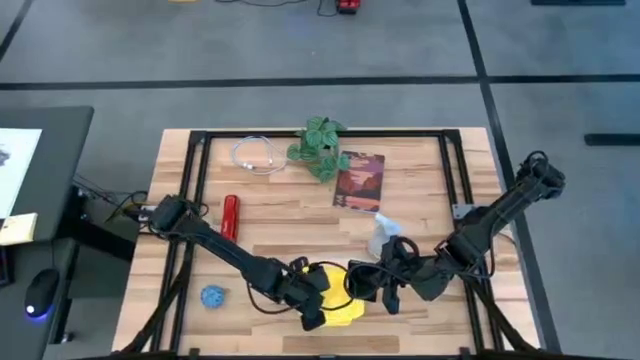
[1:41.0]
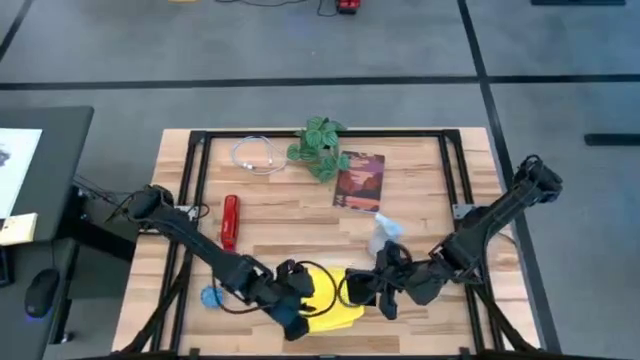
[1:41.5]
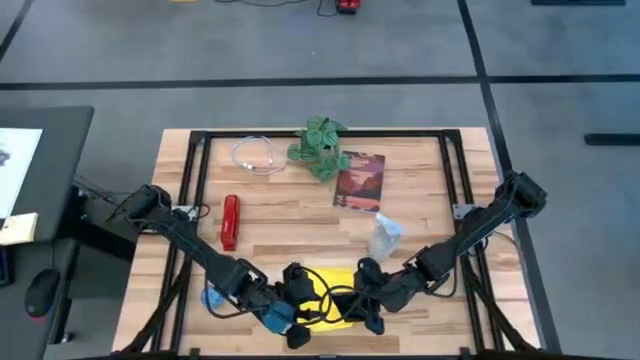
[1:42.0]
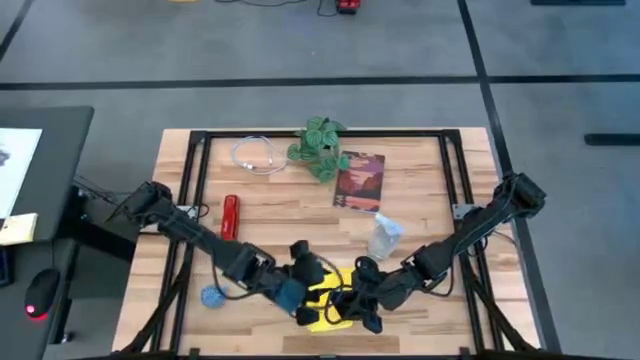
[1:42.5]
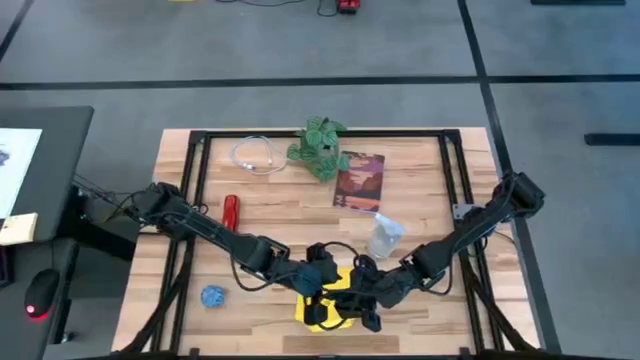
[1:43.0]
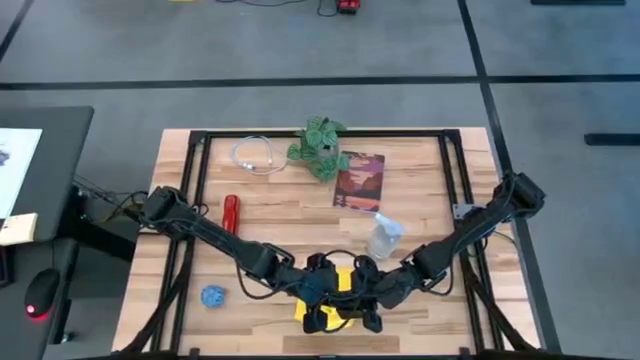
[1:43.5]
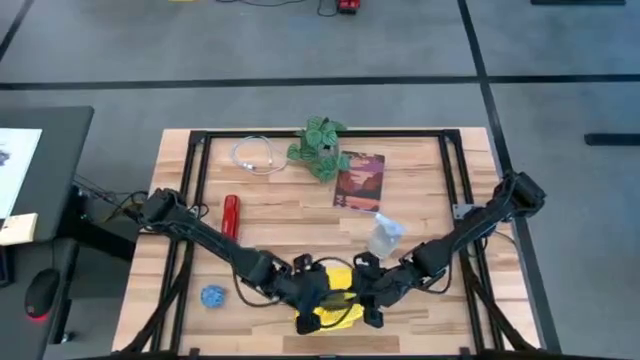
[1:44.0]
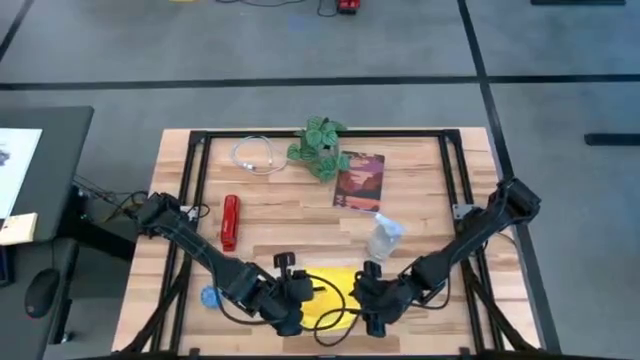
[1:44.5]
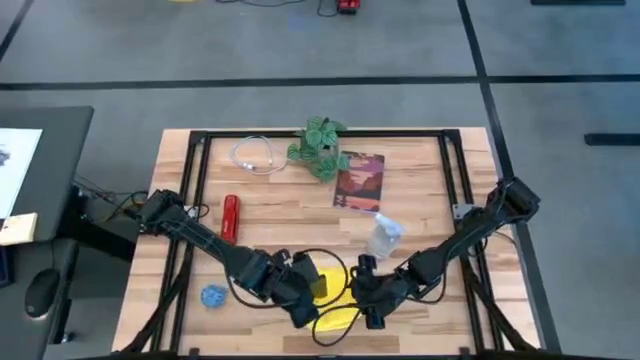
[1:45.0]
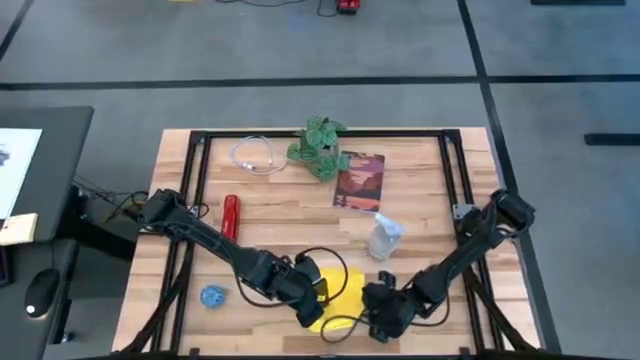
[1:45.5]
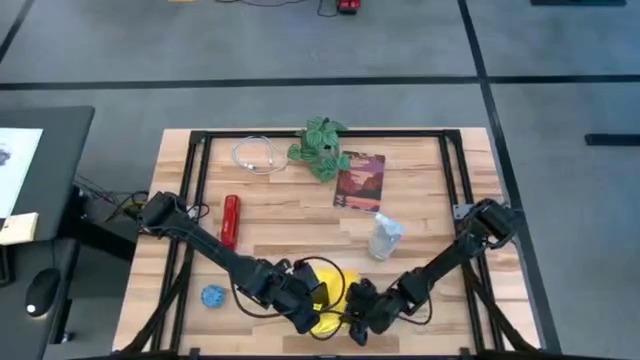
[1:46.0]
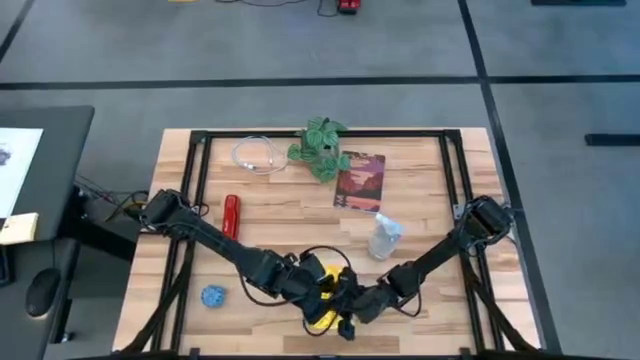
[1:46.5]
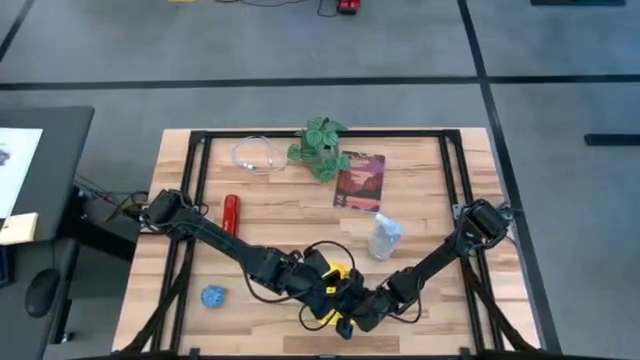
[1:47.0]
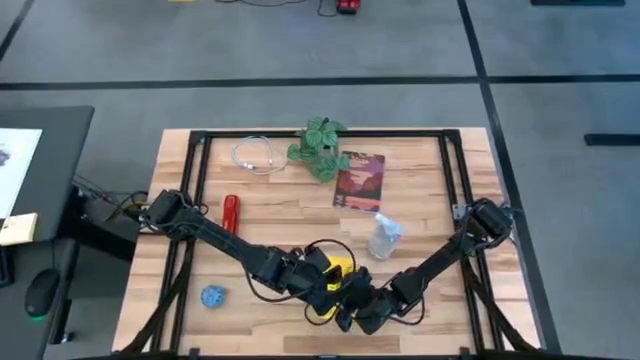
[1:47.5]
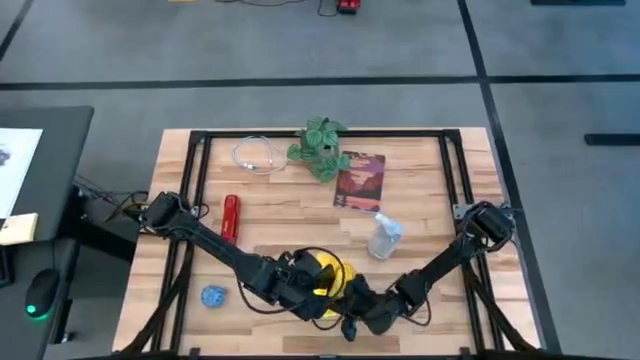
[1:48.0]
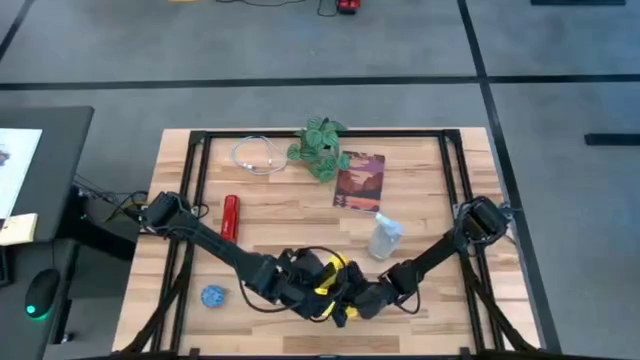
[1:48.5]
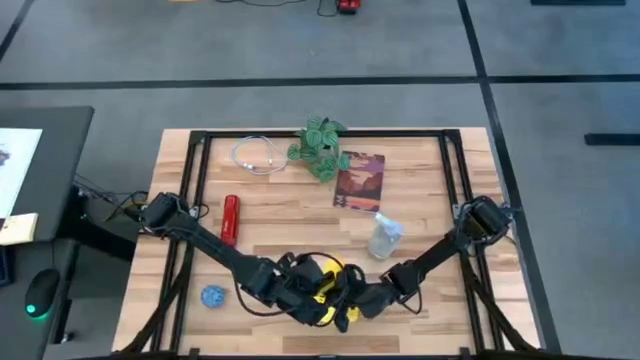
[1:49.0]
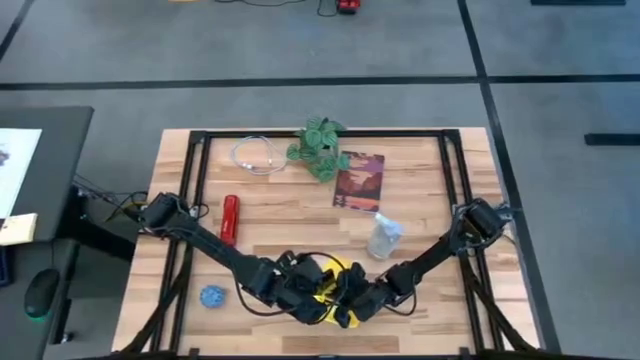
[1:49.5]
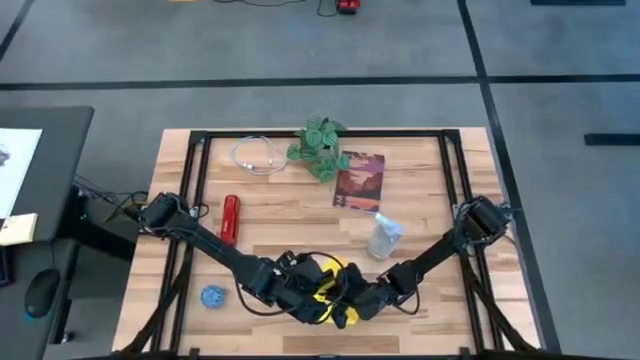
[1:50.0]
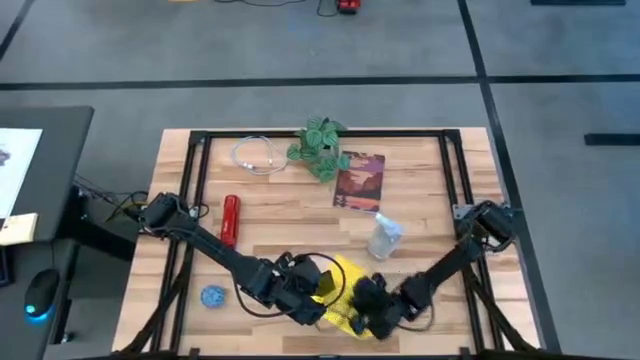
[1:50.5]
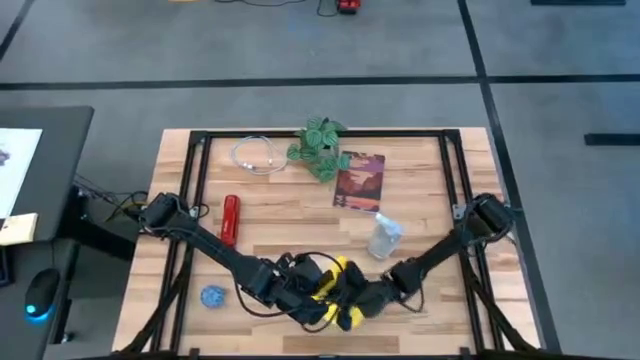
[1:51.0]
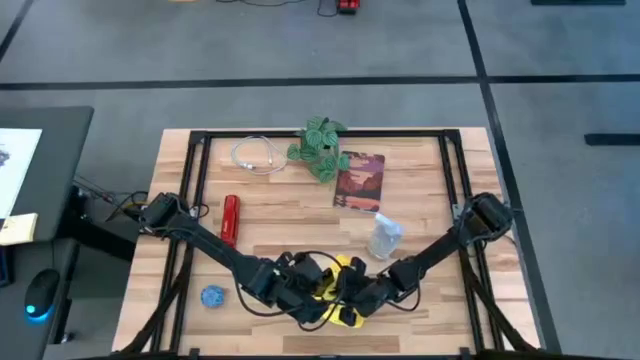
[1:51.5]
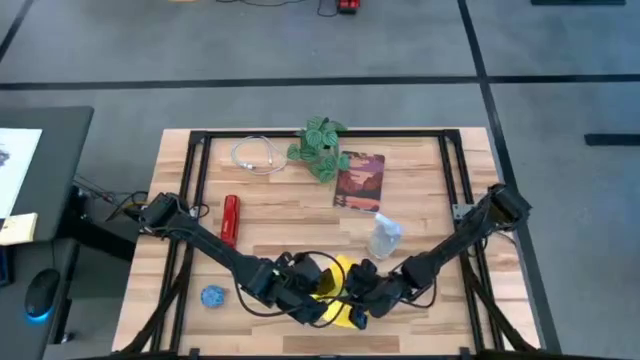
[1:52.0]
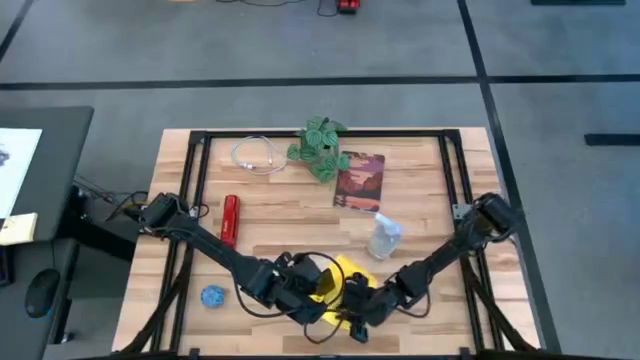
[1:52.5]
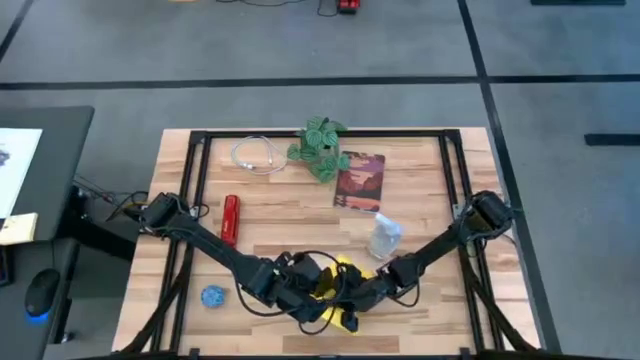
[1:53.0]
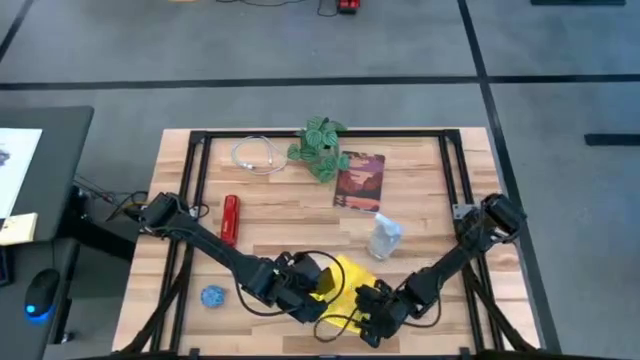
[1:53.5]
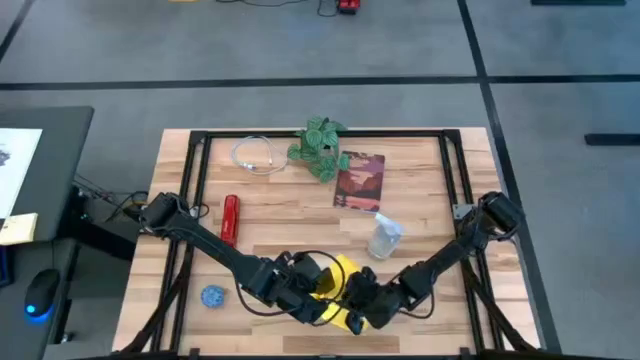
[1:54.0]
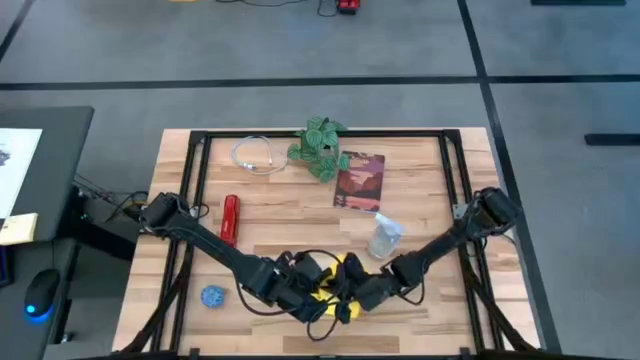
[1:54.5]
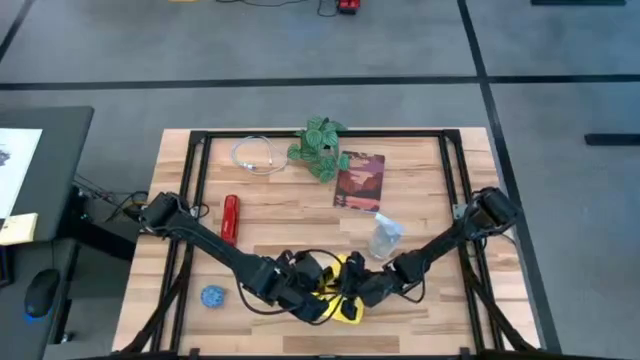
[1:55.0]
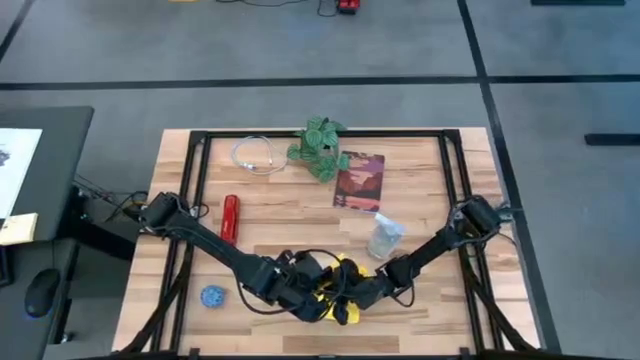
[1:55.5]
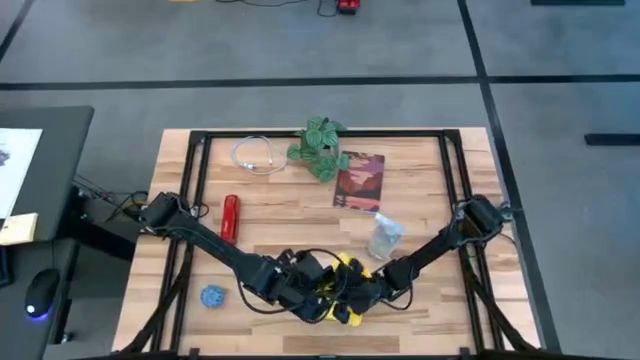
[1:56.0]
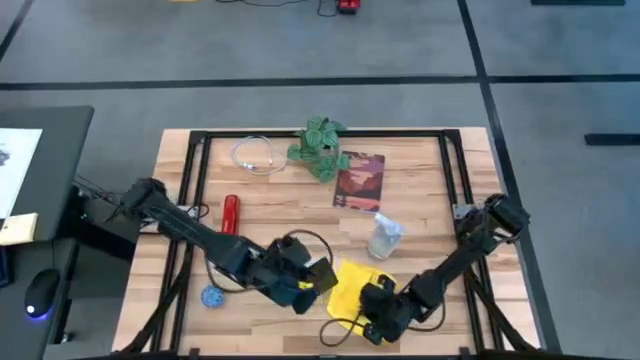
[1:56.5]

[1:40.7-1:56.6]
Task: Apply microfiber cloth
Wipe the back of the cellphone using the microfiber cloth

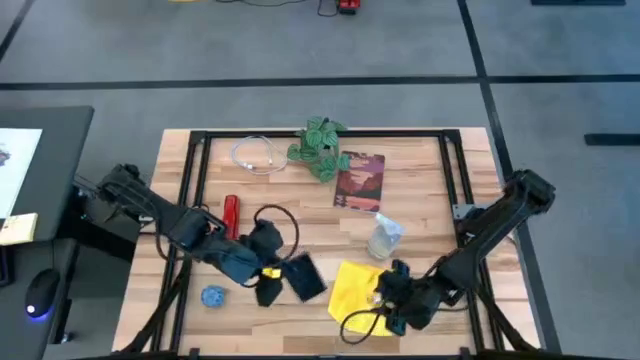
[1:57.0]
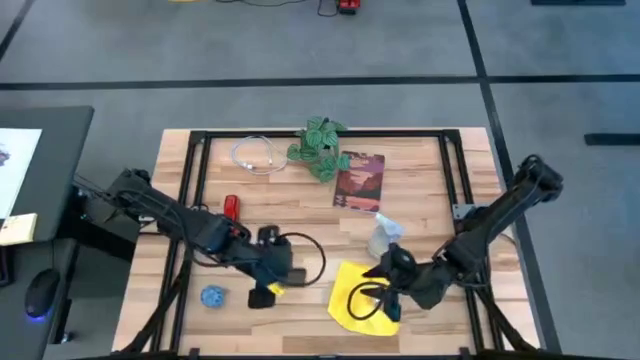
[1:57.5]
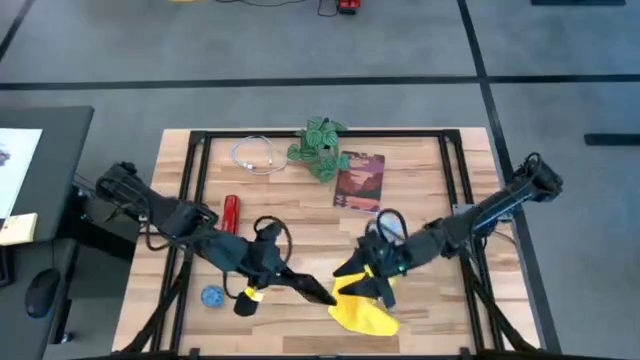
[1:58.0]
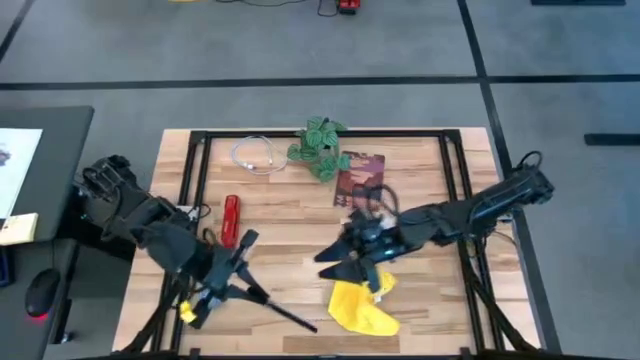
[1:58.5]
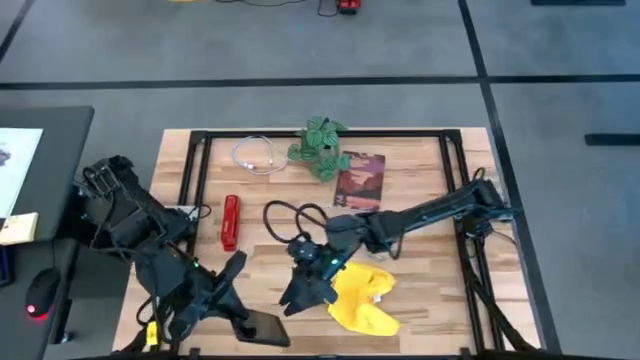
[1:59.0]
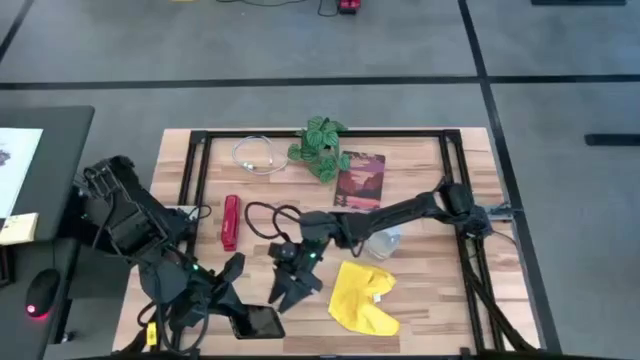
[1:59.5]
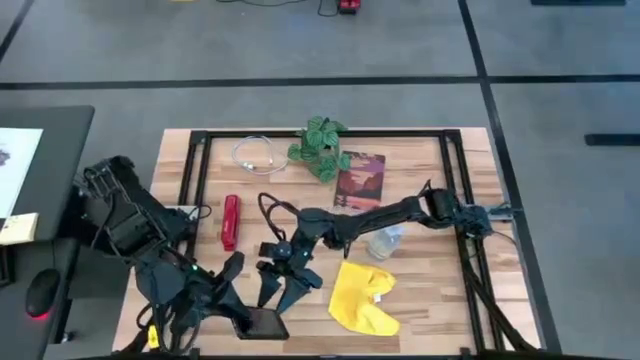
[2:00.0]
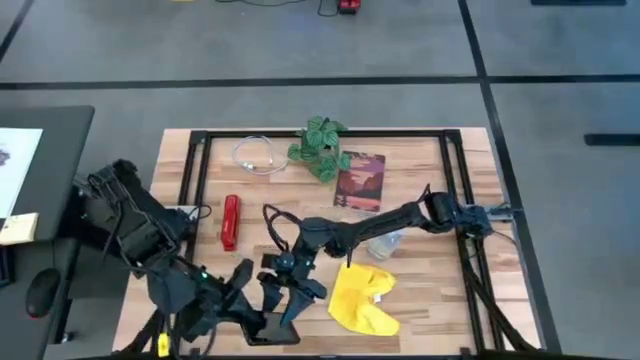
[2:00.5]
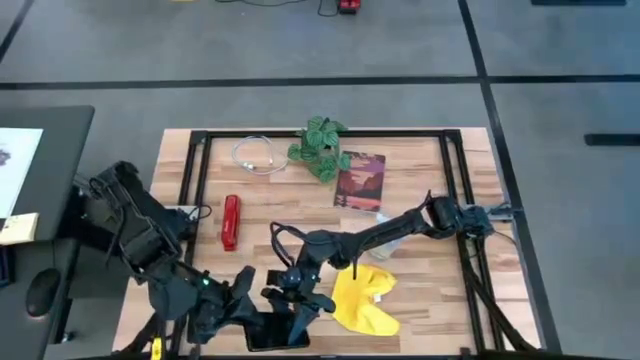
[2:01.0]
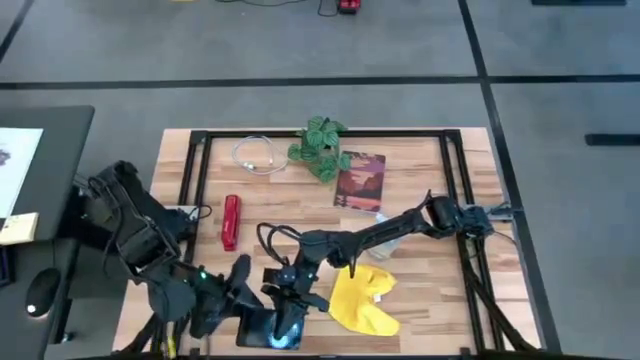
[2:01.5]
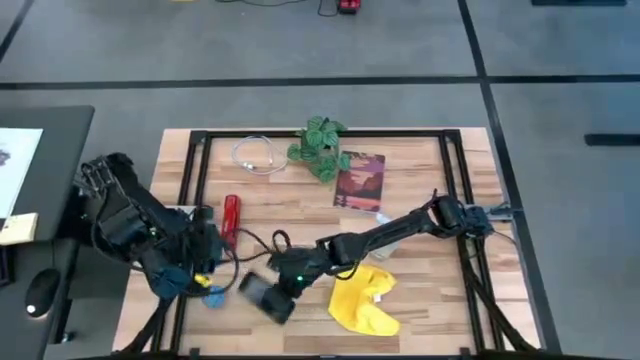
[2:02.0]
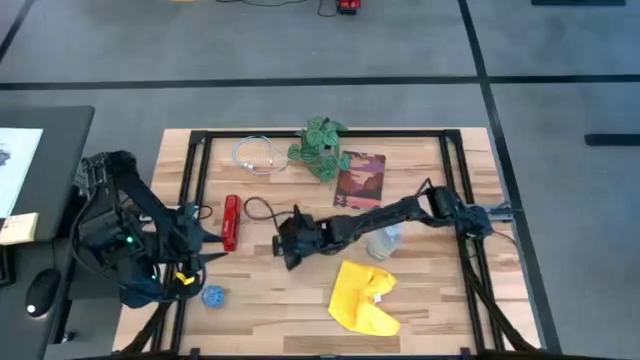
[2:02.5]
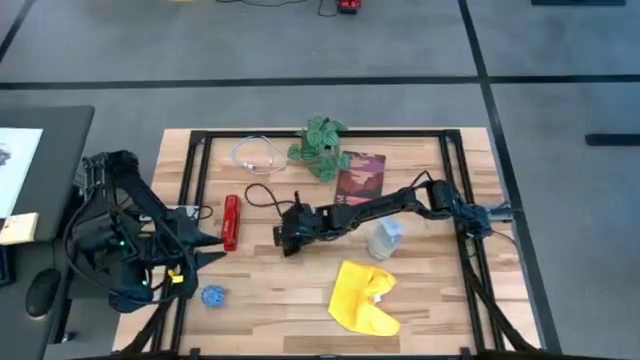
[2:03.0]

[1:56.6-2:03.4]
Put the cellphone on the center of the table
